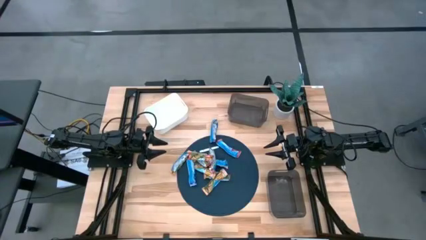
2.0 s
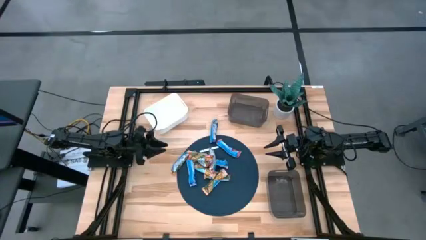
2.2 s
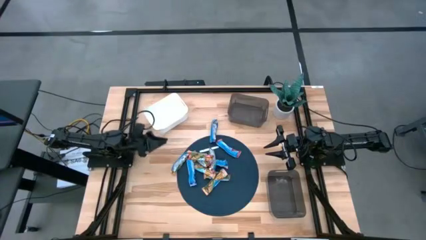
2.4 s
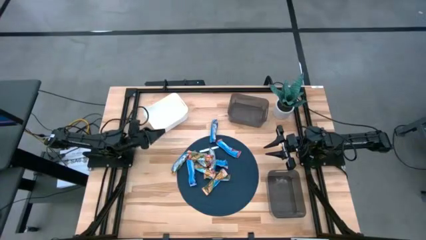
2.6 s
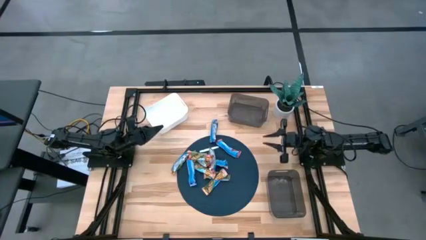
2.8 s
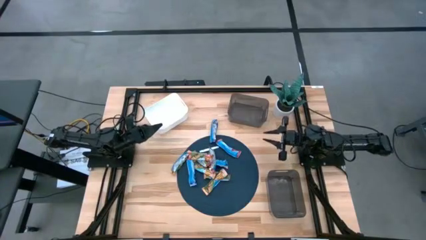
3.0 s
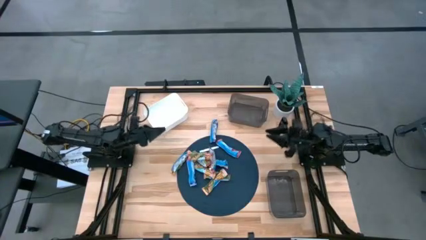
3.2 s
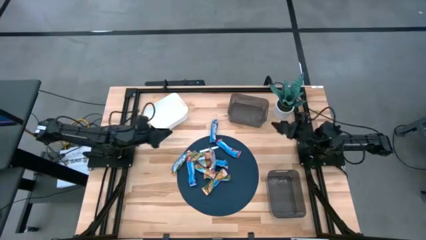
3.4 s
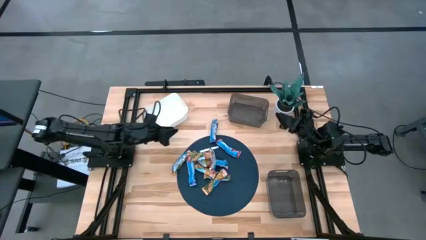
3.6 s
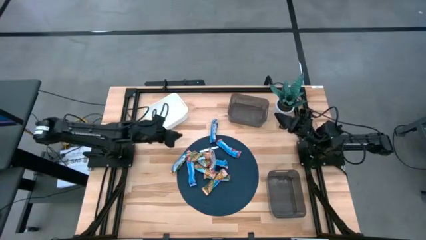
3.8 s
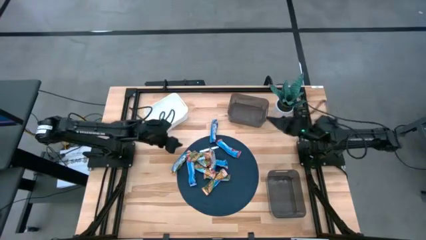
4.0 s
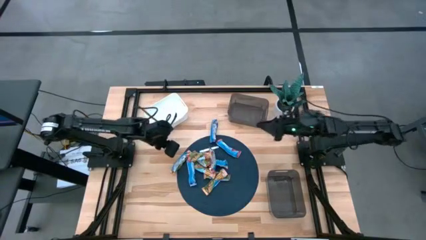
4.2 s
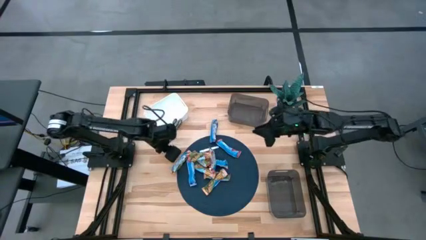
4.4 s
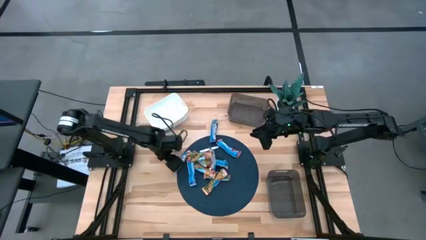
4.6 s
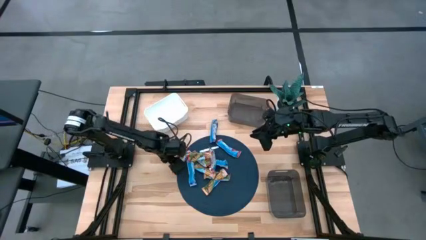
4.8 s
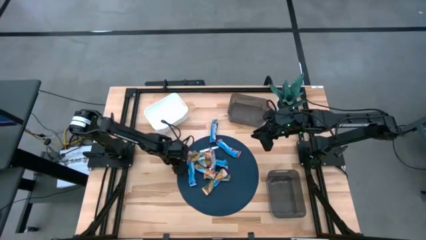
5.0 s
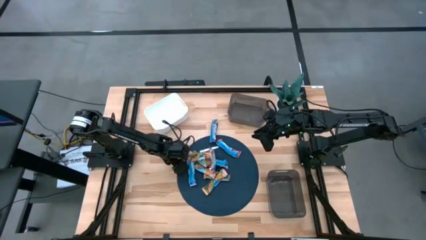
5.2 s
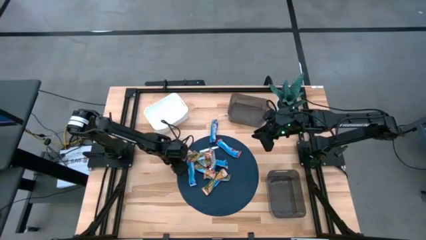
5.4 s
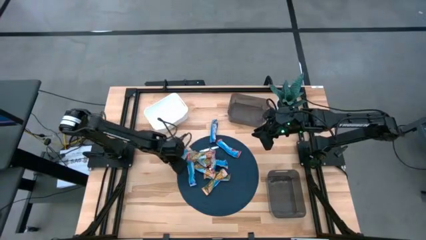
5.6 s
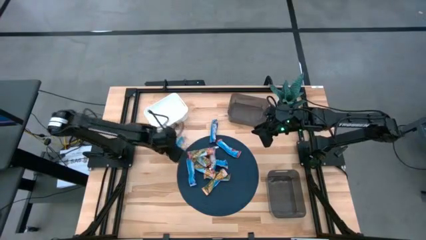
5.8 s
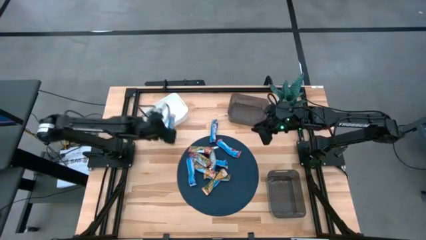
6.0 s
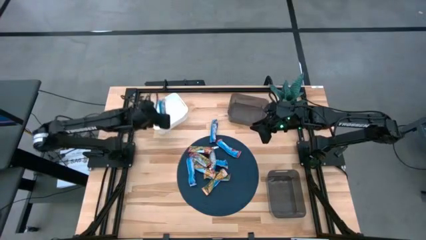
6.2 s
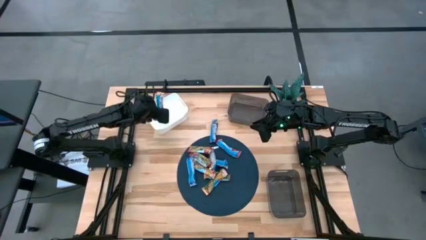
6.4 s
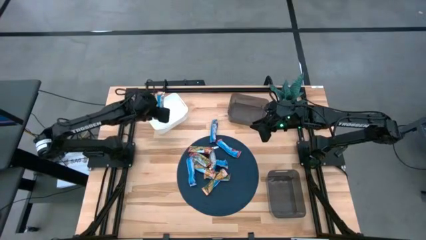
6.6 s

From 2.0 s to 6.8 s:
Task: Pick and place Granola Bars by type
Put the orange granola bar into the white bin

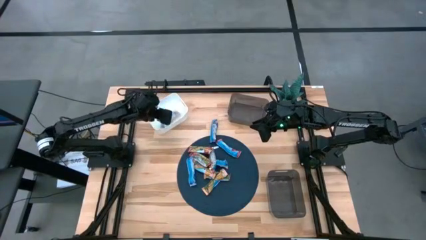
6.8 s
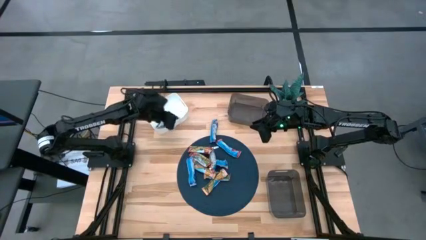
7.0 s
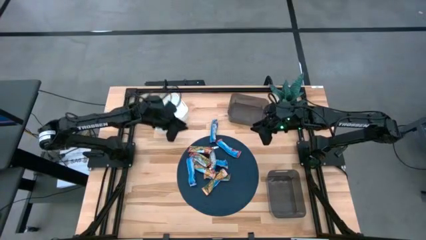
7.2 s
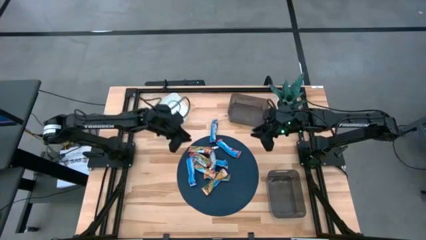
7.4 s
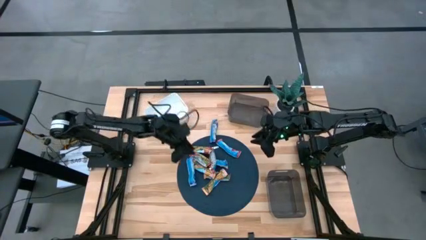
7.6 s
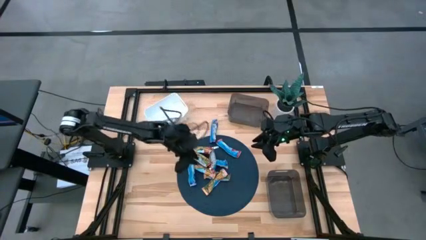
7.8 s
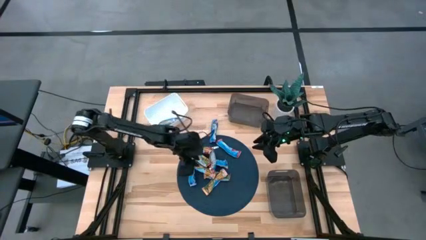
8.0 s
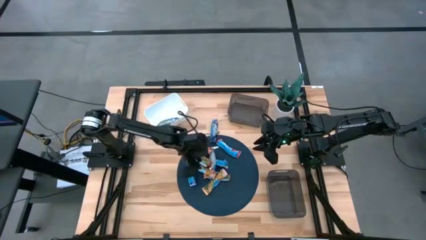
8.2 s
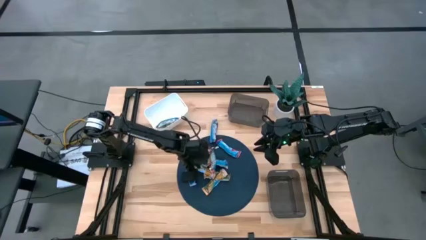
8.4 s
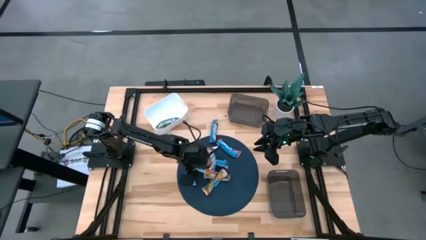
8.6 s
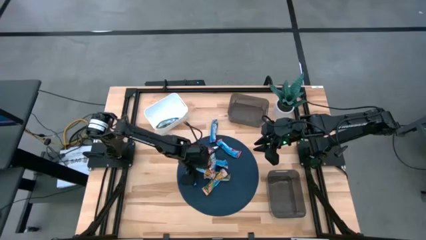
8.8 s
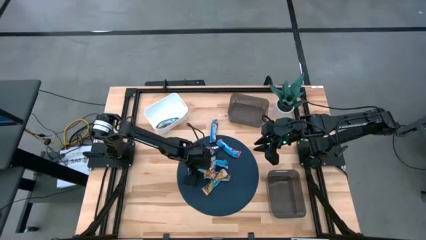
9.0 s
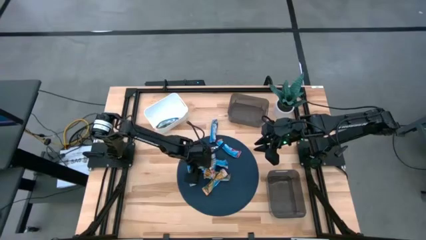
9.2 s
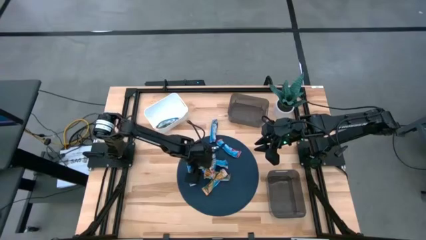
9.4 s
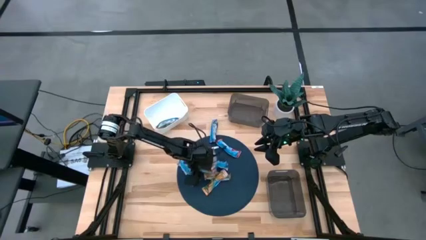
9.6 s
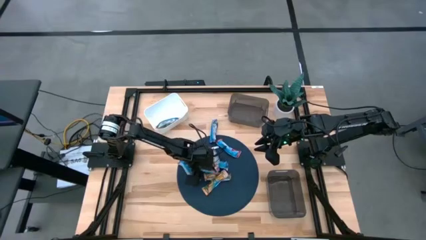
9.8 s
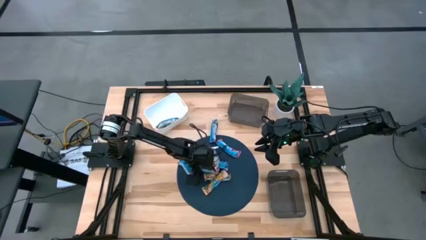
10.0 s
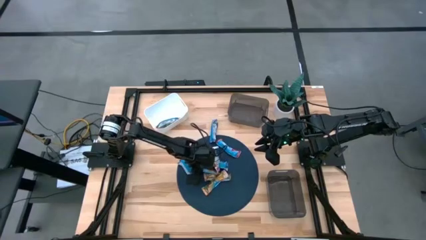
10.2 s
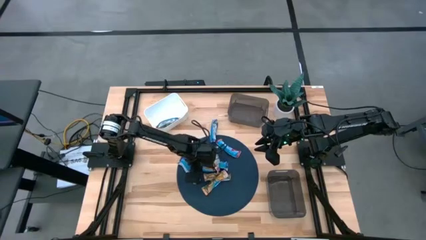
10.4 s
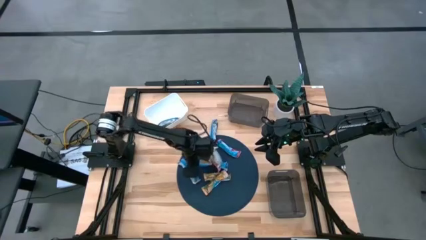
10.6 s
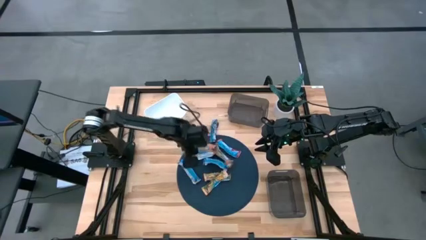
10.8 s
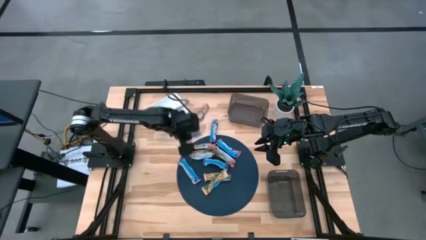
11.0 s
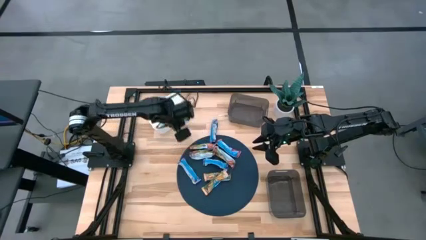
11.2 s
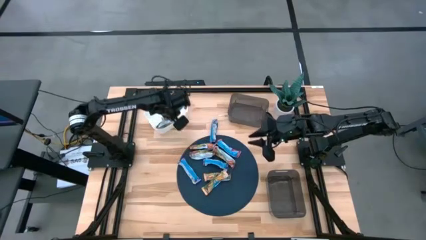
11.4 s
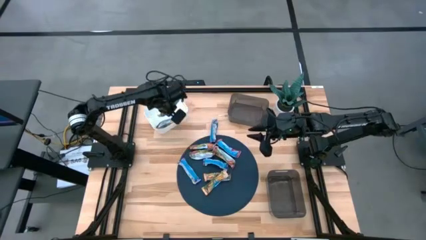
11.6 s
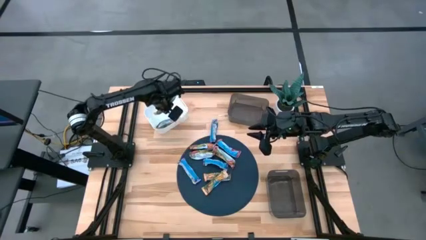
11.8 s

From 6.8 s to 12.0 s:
Put the orange granola bar into the white bin

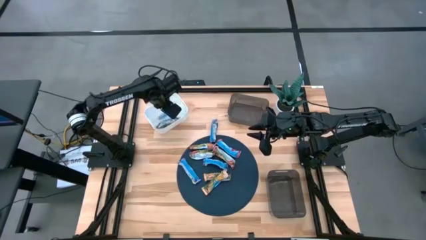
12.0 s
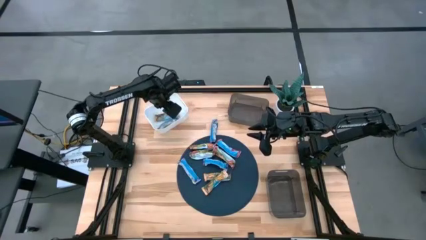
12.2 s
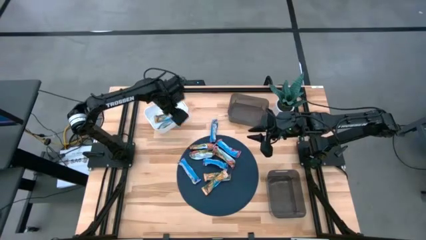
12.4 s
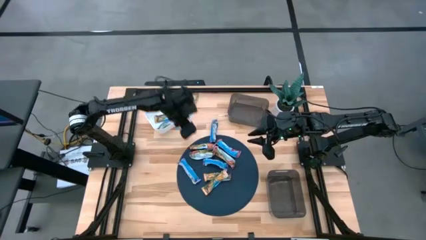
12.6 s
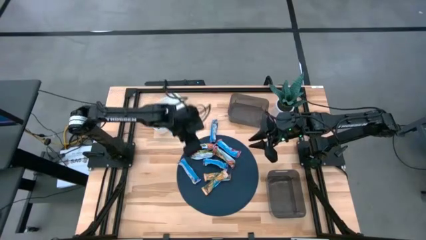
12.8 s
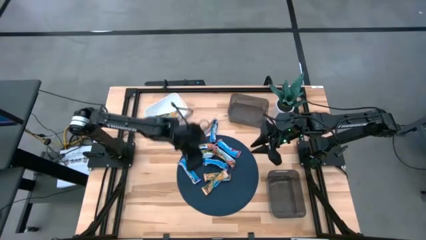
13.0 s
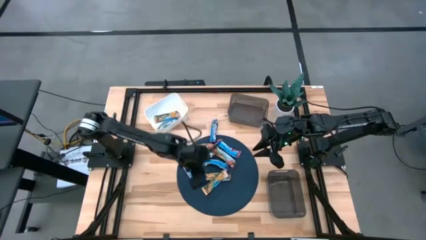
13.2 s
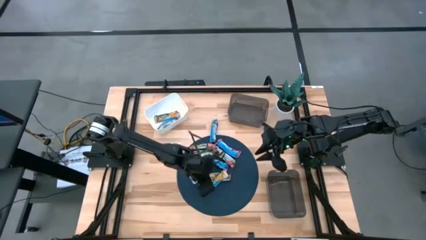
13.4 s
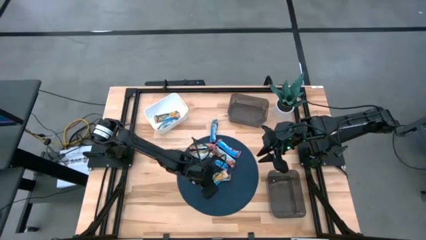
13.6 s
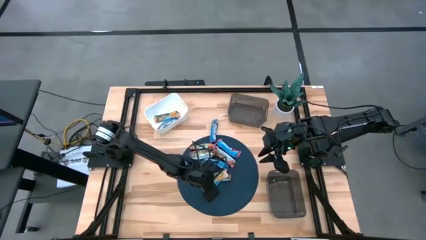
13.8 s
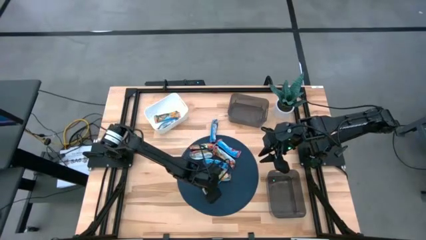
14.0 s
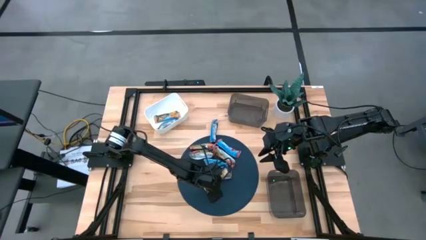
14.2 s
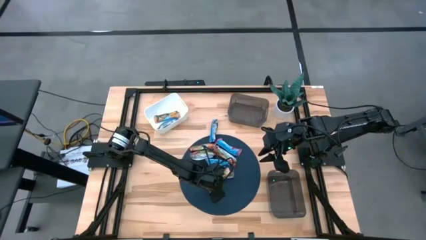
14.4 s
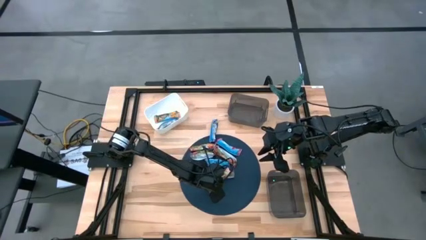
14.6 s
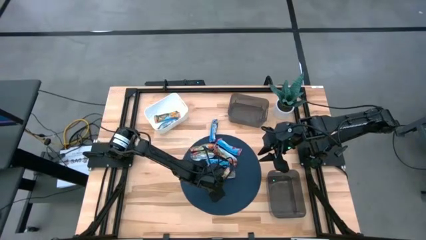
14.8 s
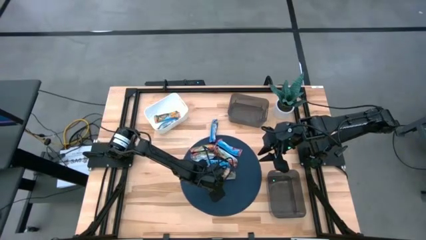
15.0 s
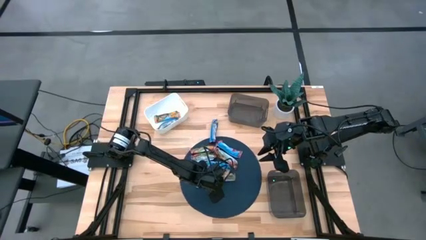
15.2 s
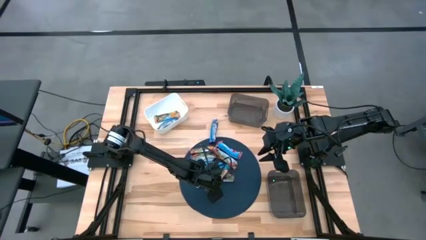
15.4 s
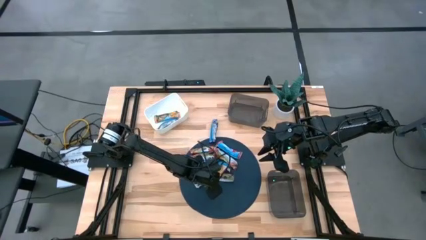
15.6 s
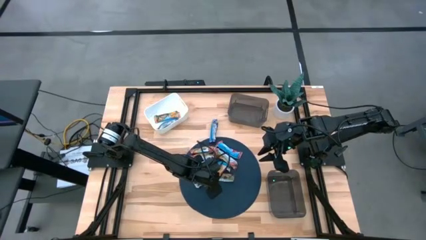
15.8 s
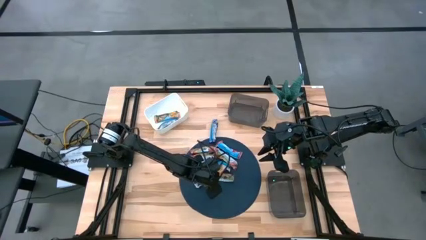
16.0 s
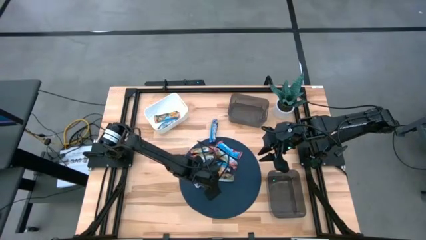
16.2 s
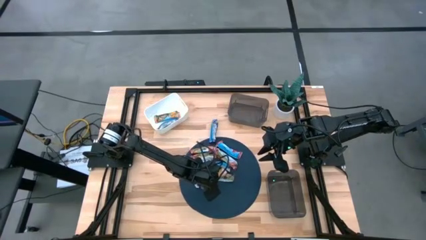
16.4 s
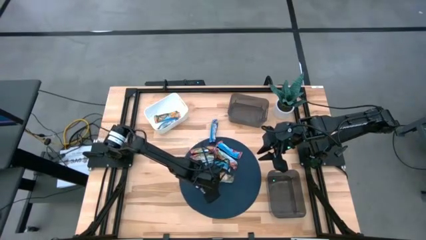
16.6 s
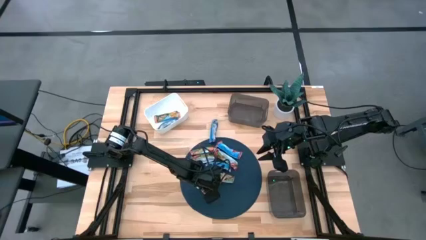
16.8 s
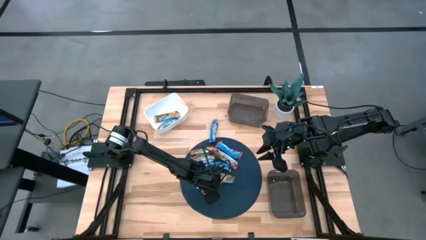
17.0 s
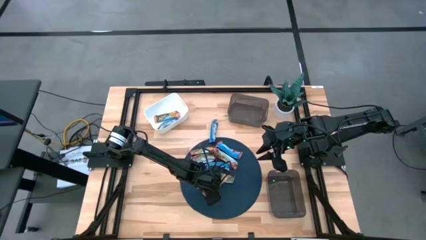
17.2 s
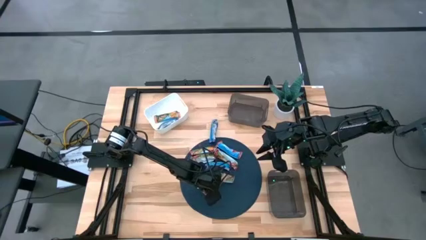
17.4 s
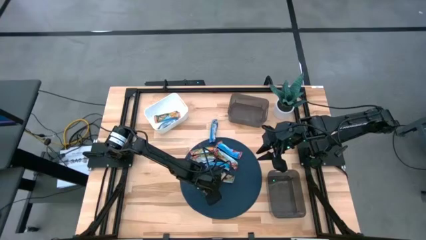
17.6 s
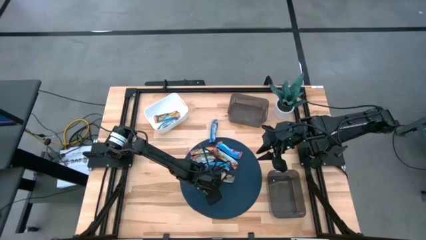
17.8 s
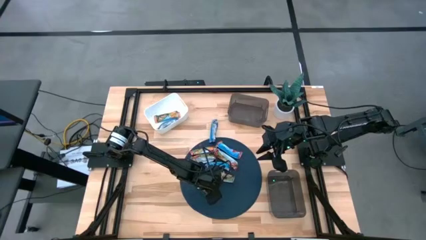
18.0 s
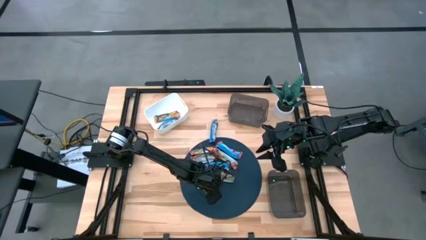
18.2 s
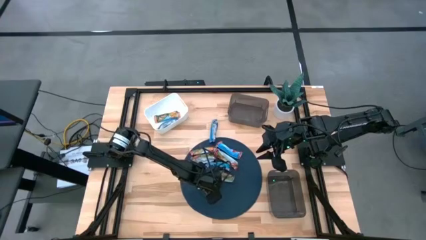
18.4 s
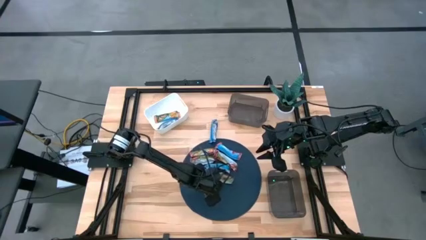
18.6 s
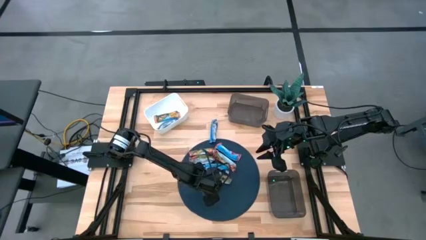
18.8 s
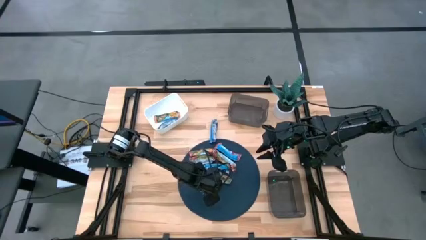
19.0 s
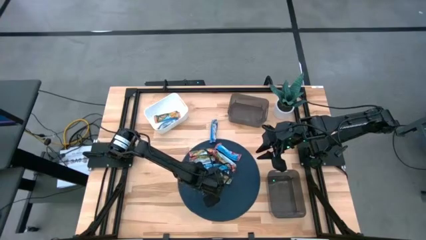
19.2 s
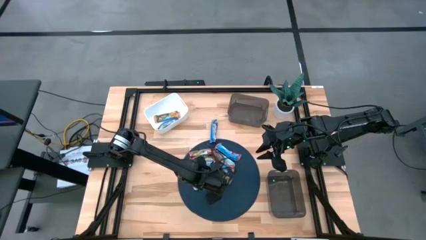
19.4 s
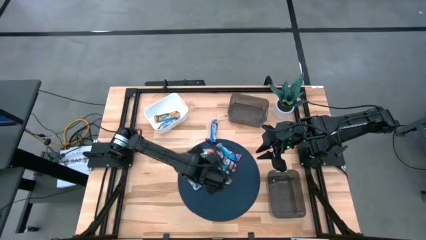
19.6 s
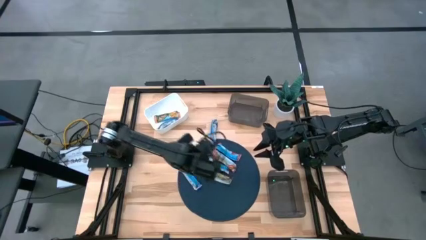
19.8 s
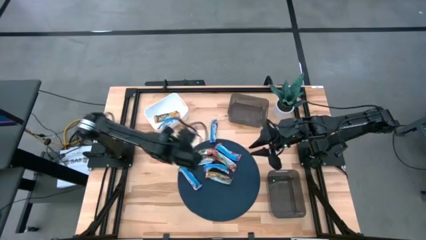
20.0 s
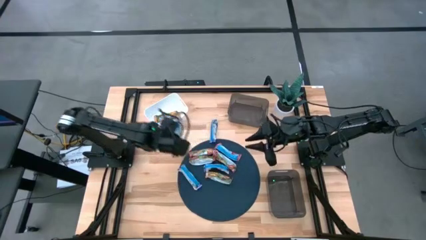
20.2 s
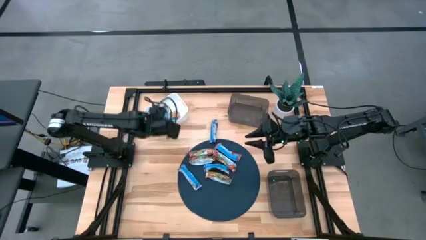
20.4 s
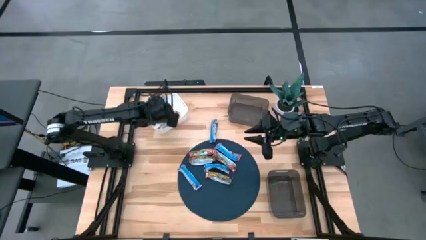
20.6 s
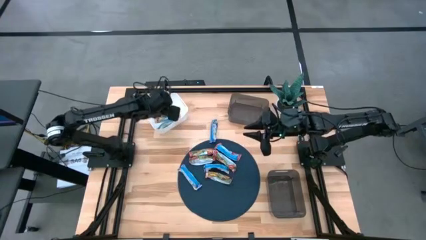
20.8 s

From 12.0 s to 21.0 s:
Put the orange granola bar into the white bin
